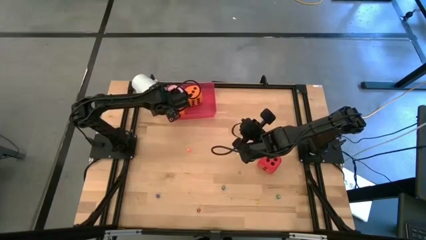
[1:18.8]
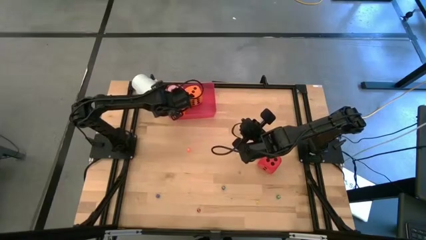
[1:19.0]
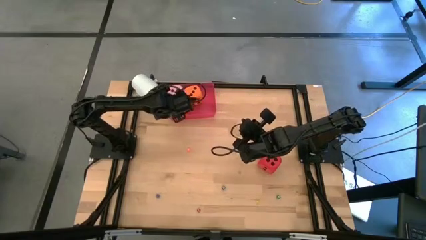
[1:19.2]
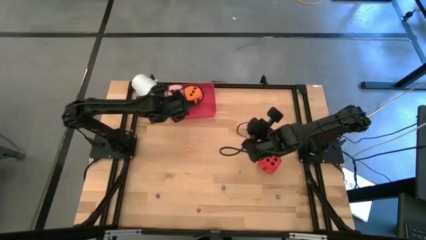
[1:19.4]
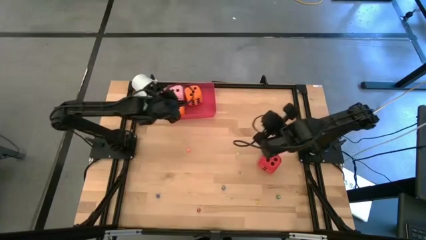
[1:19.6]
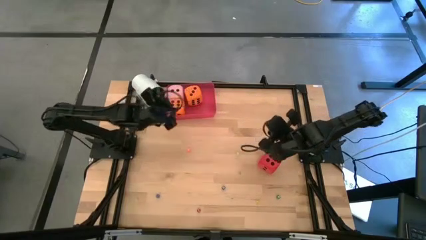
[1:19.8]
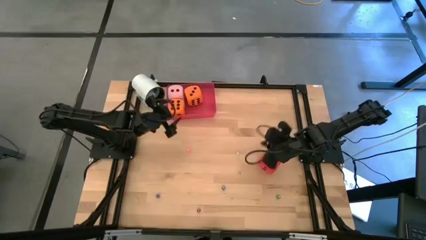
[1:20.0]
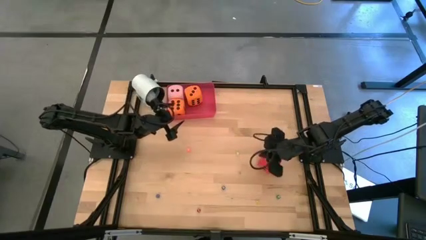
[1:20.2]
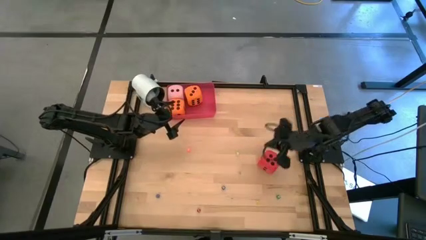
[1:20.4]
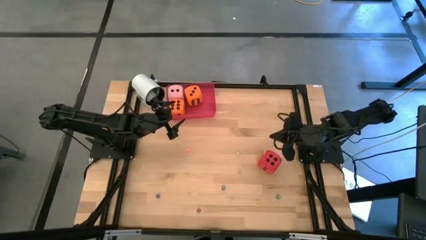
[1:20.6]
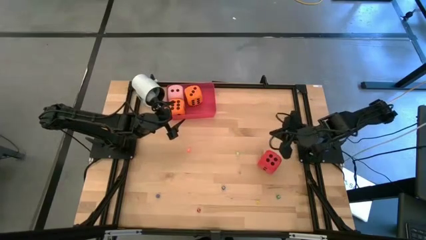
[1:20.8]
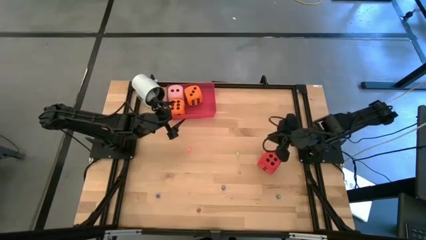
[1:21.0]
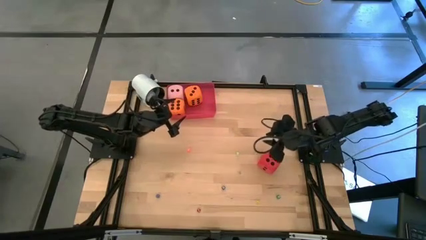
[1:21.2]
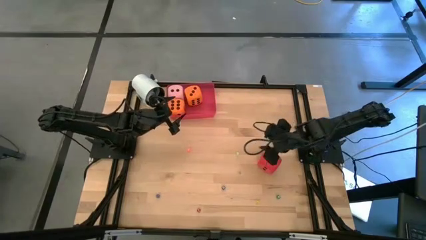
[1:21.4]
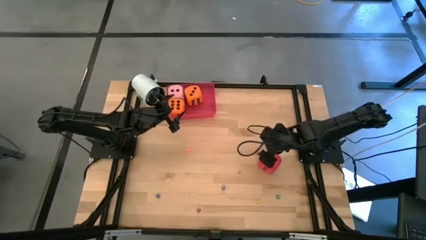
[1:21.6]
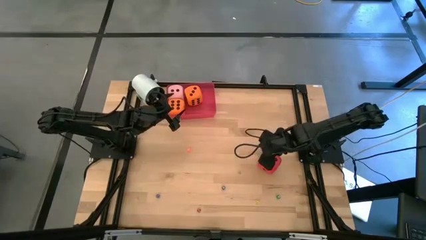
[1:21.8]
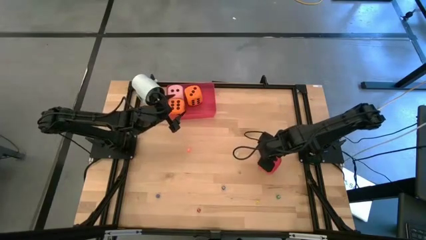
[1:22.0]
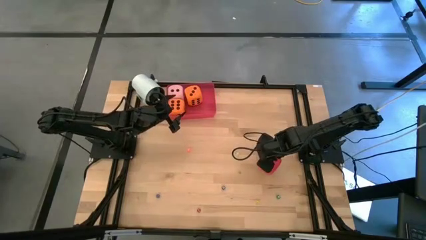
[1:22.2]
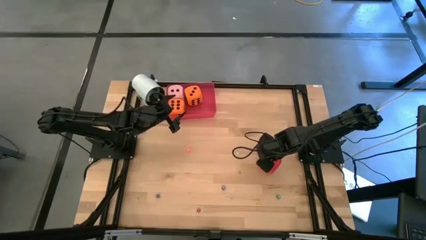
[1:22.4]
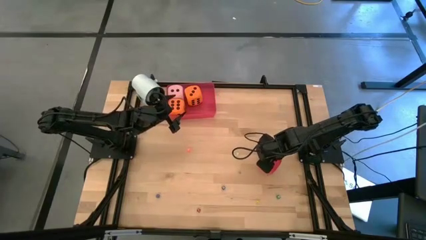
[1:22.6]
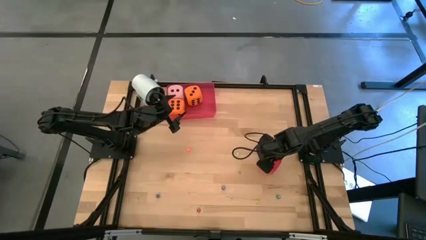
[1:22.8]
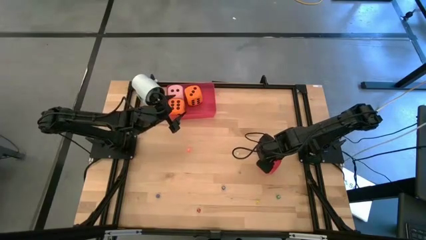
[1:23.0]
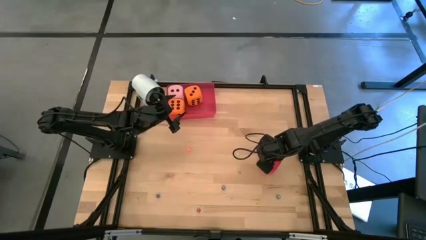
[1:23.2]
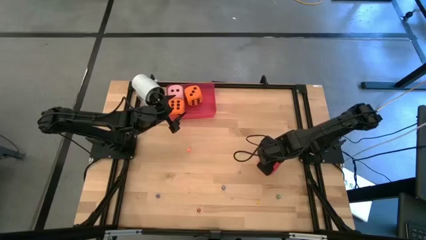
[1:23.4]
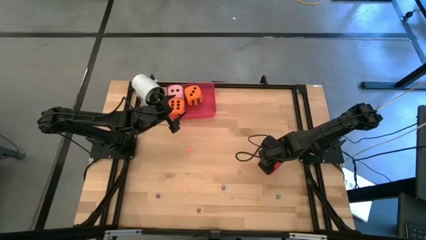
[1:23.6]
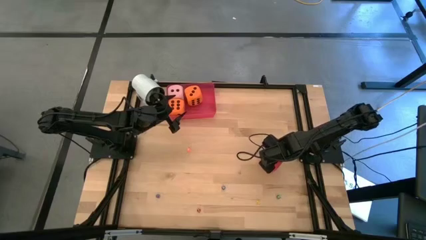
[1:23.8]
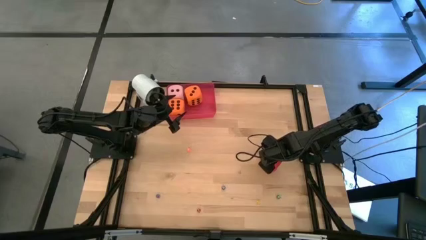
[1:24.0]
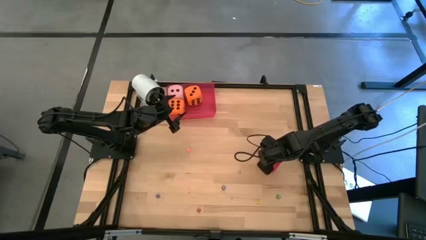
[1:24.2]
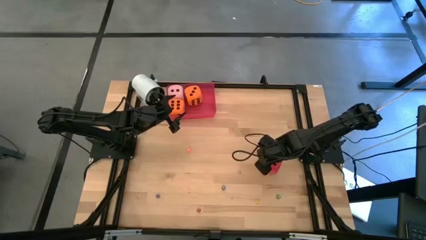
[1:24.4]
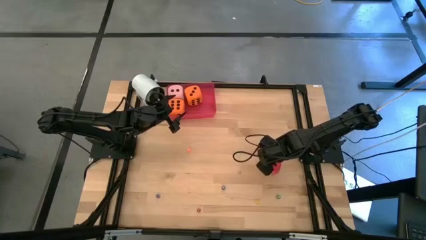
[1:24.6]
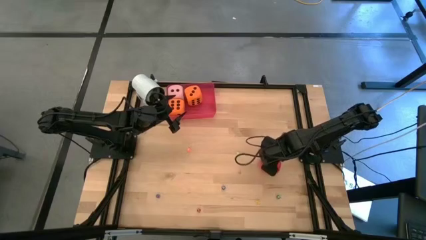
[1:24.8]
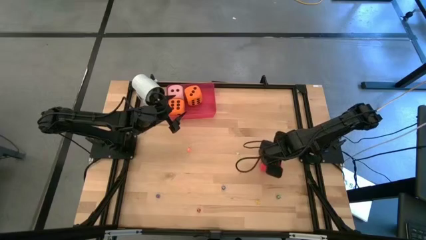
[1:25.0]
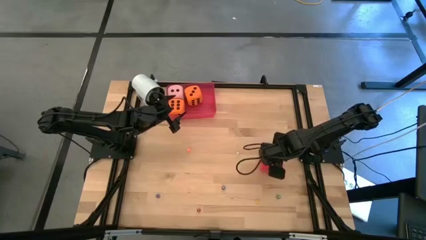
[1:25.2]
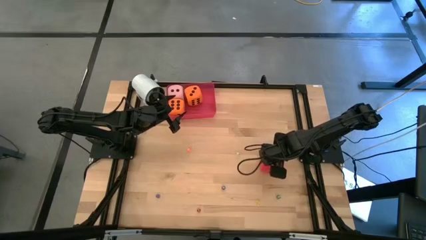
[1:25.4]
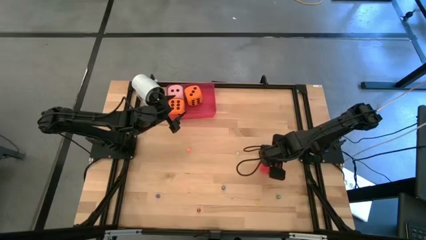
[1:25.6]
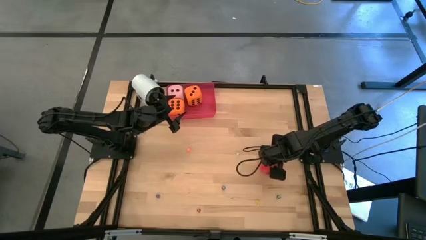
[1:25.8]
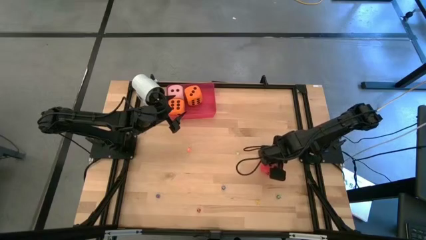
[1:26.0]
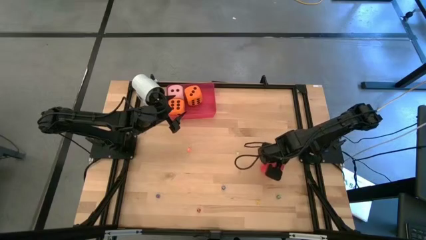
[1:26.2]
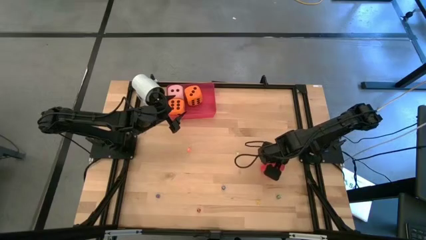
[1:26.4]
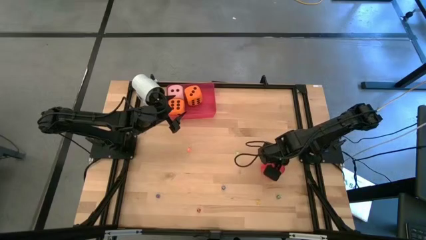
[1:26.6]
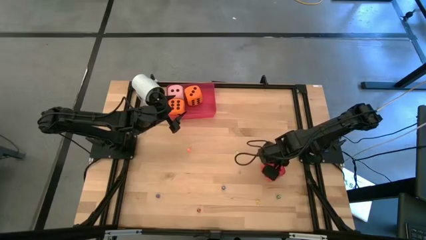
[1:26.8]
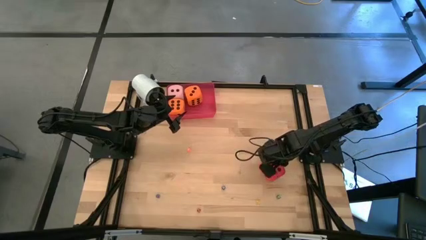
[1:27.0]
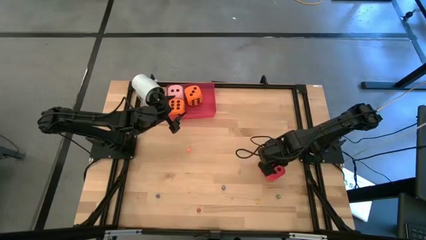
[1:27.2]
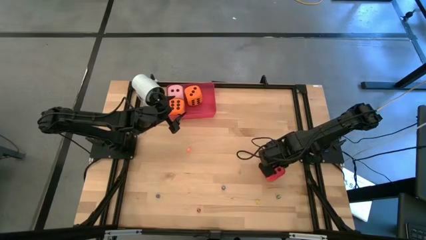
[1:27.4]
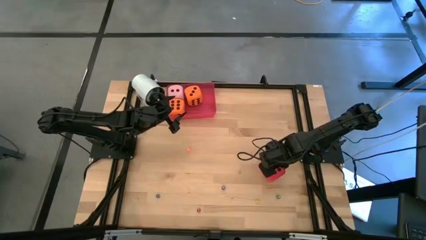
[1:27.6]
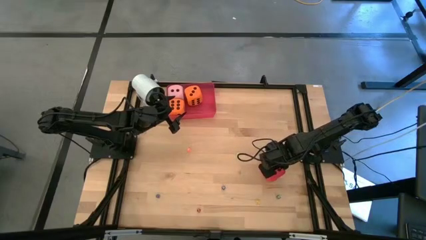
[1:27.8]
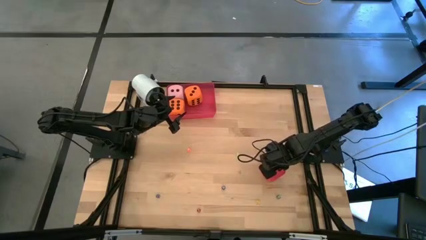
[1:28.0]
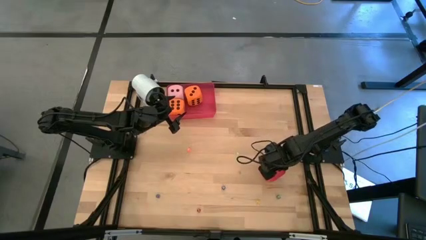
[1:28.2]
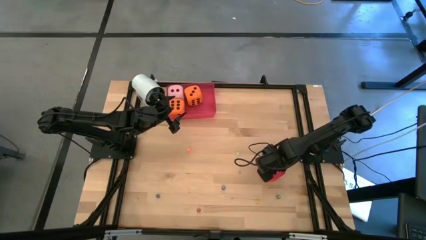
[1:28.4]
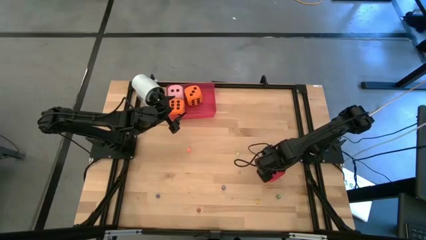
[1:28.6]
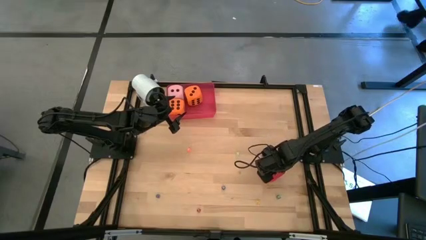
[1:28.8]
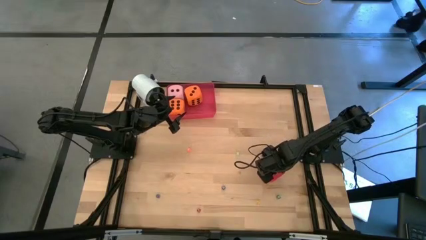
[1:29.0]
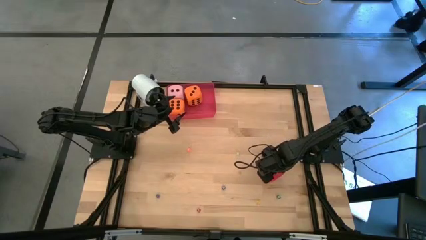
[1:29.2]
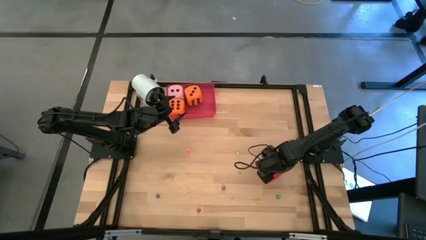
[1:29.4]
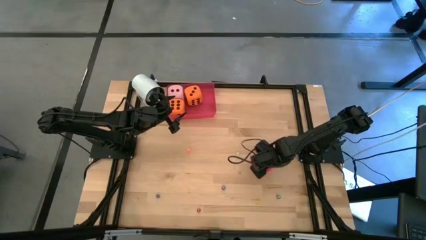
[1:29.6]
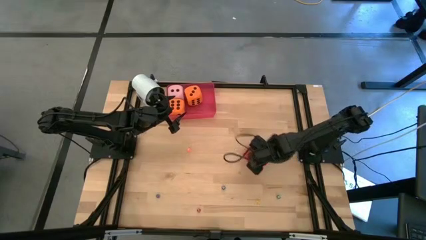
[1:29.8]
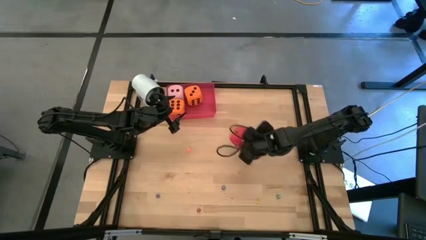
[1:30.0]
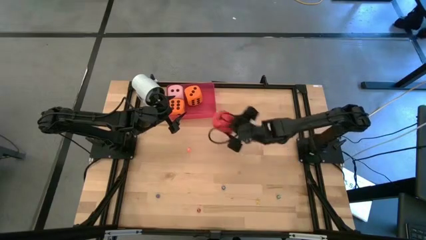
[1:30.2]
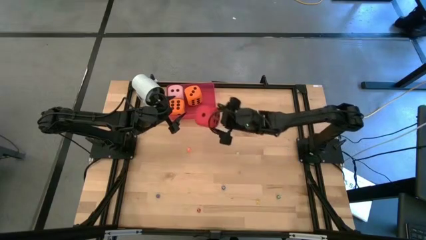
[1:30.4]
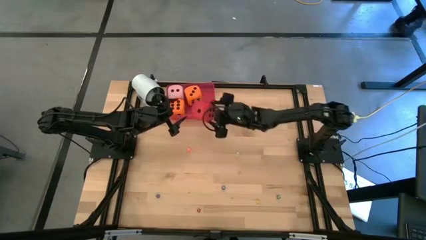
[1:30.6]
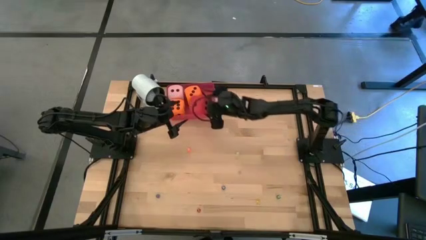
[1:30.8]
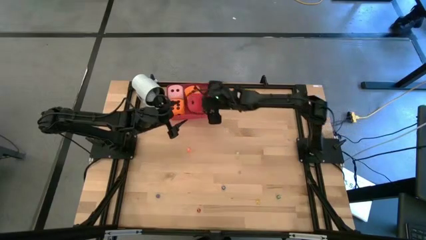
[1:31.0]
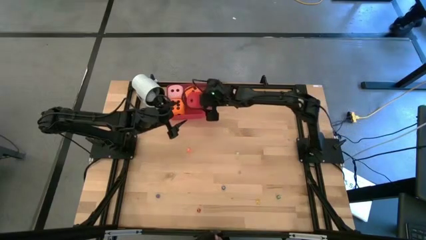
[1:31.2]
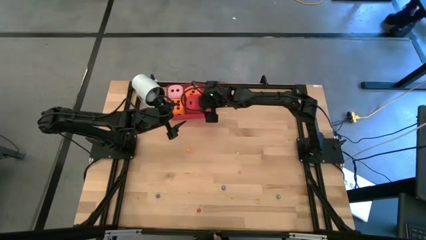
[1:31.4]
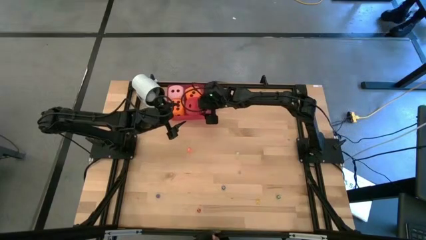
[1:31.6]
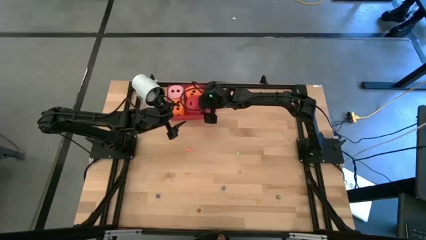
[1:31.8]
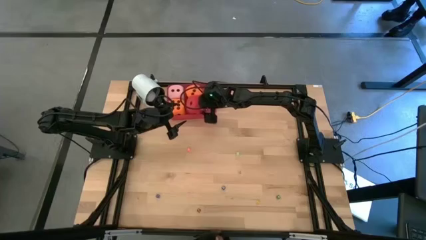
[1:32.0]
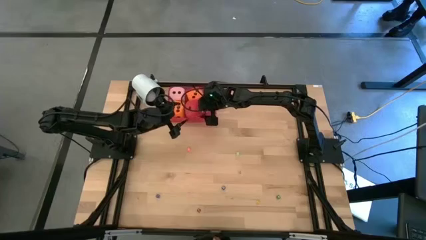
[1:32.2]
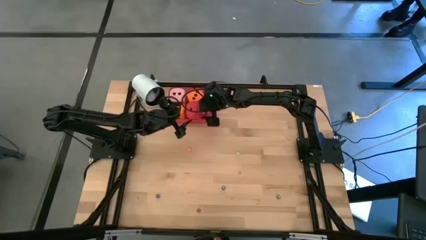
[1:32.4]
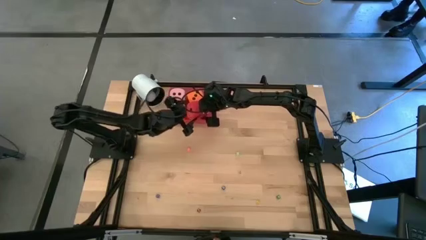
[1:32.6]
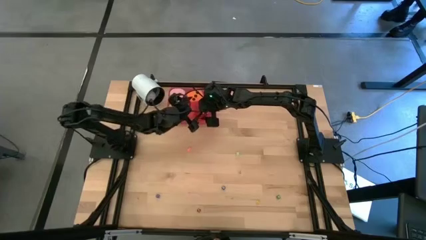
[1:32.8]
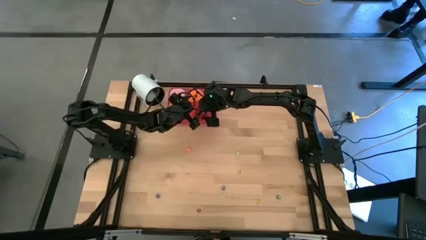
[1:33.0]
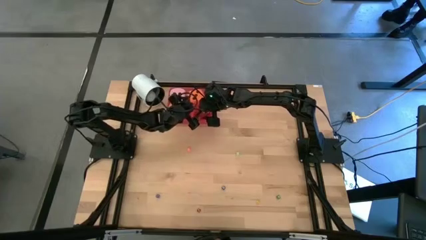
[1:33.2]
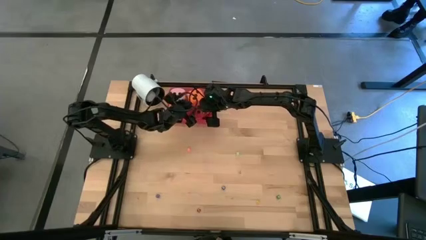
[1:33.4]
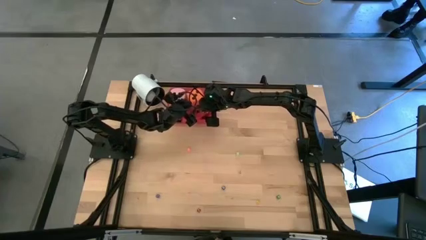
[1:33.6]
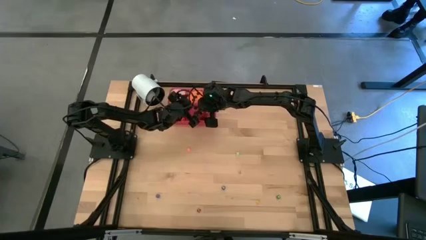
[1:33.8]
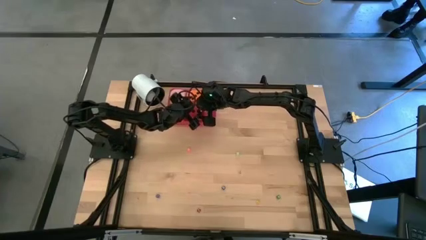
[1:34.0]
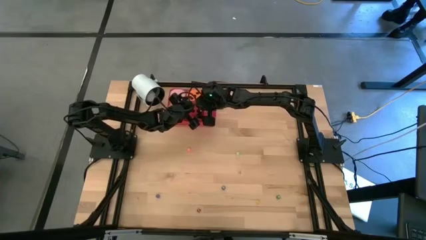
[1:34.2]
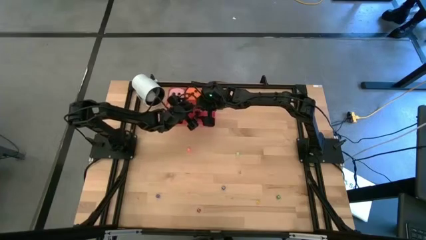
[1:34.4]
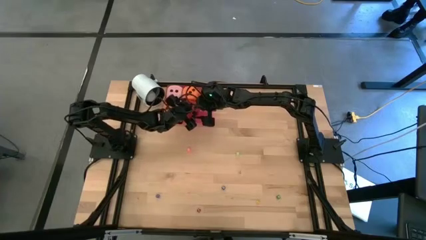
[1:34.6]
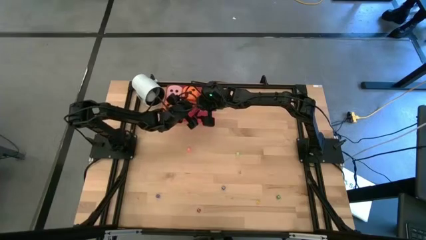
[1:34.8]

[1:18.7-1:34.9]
Task: Pick & Place Dice
Put the large red die into the red bin
